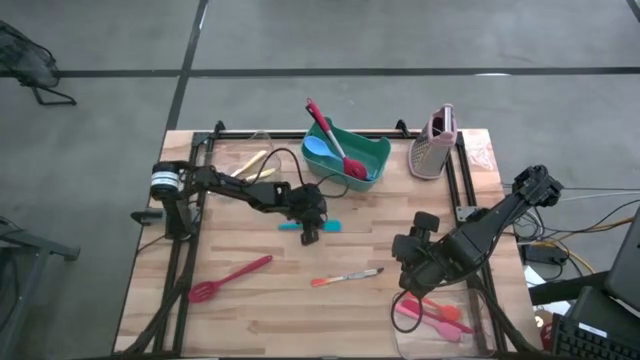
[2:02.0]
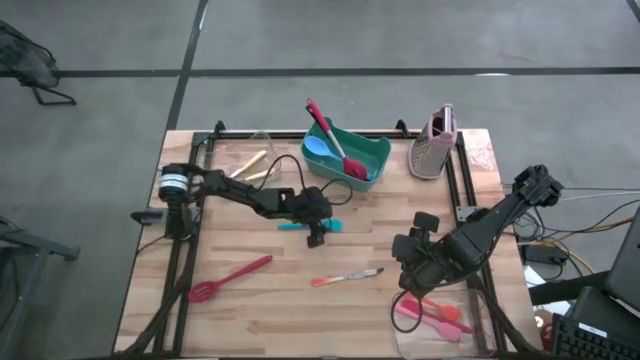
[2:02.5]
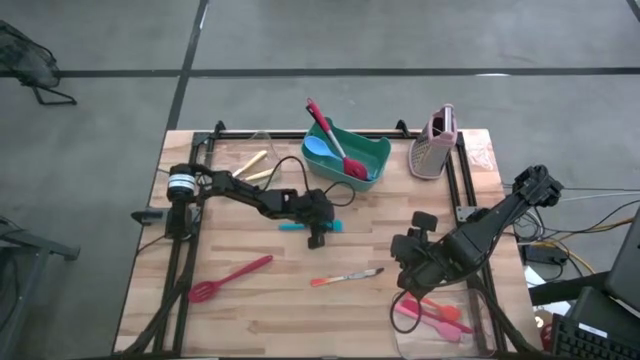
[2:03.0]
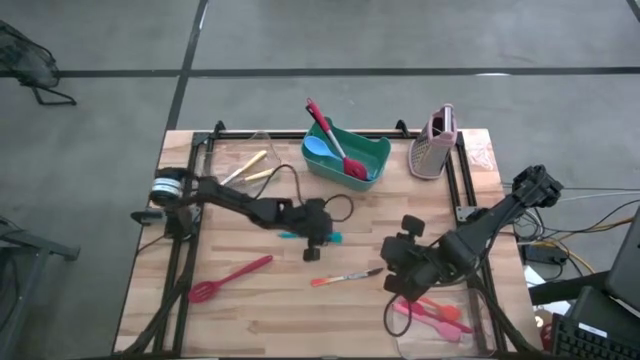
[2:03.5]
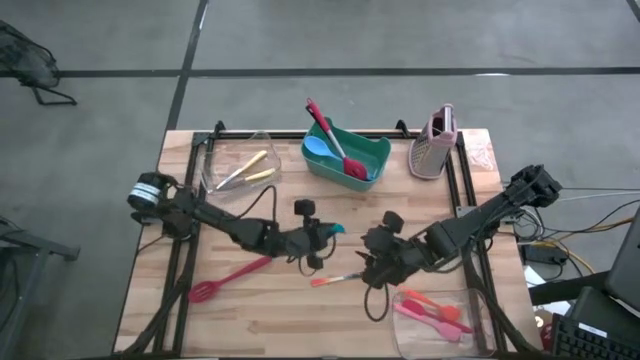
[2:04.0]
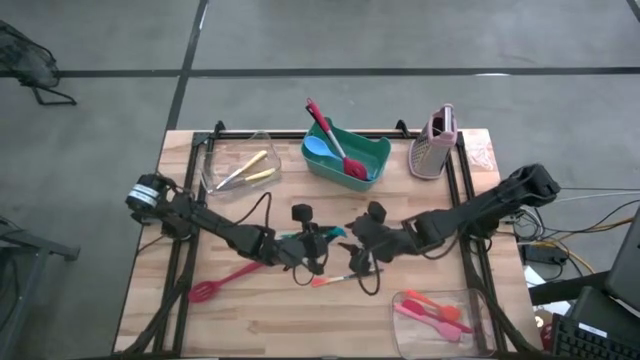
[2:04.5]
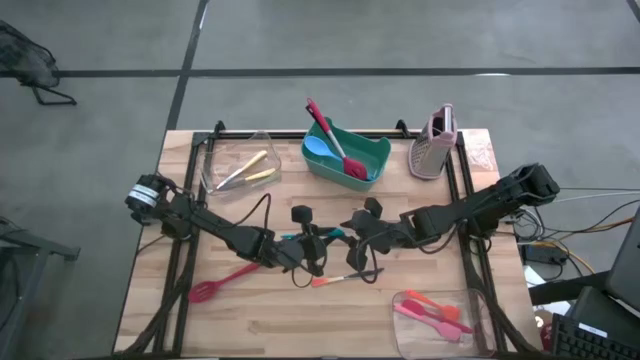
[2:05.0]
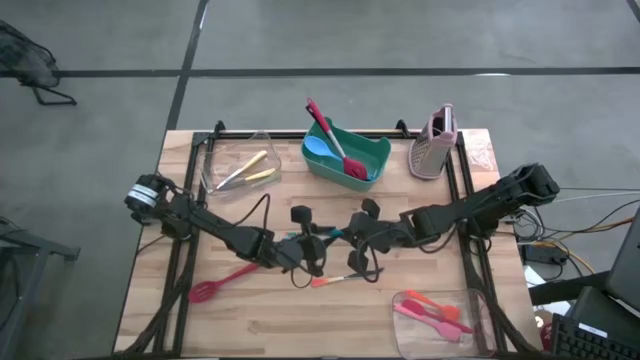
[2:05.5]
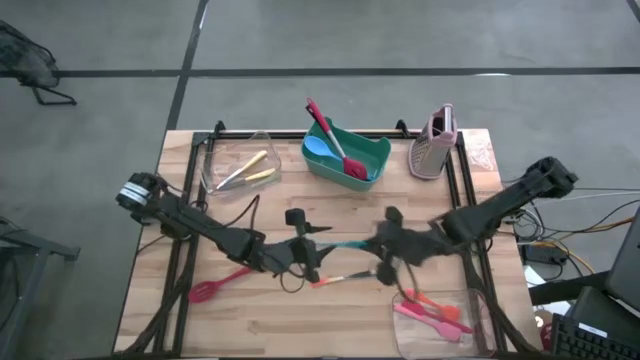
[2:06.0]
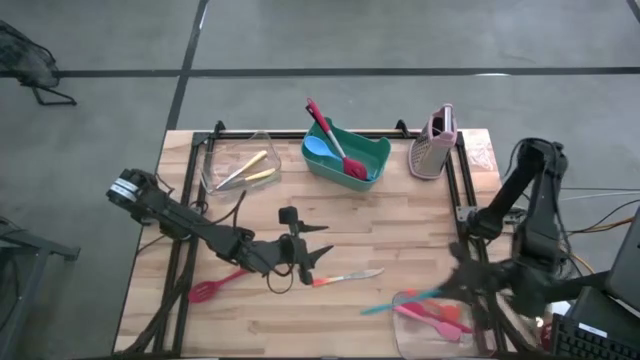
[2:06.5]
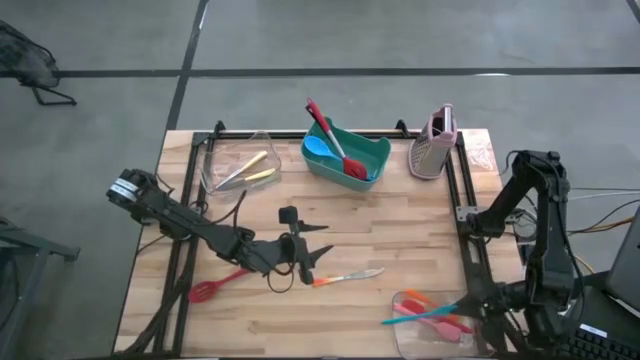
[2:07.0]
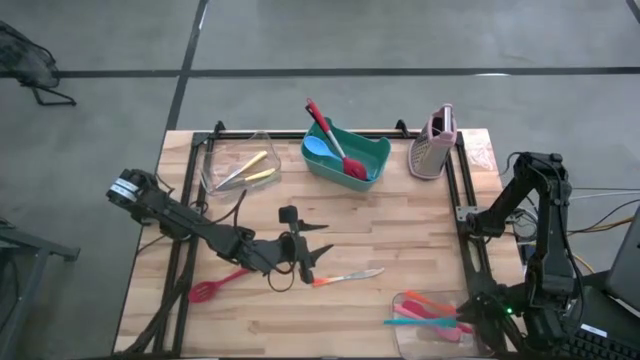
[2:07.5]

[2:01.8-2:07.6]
Task: Pick & Place Kitchen Items
Put the blue spatula into the bottom transparent bin

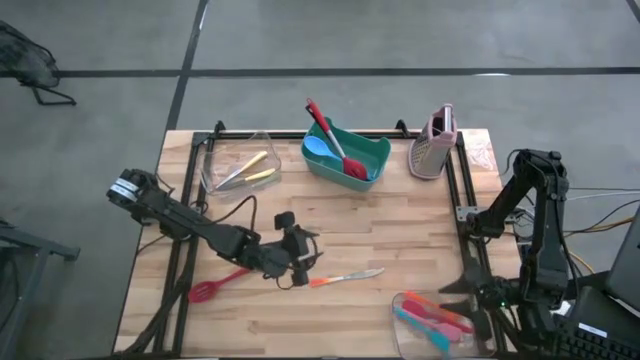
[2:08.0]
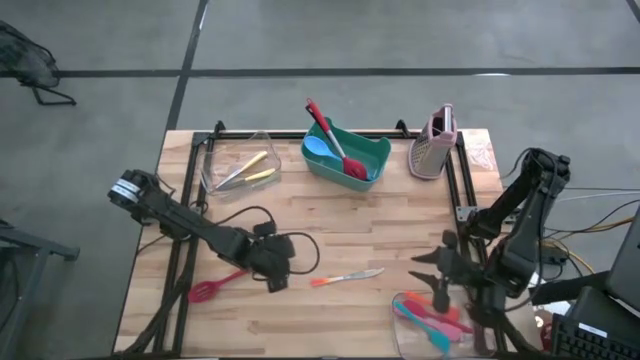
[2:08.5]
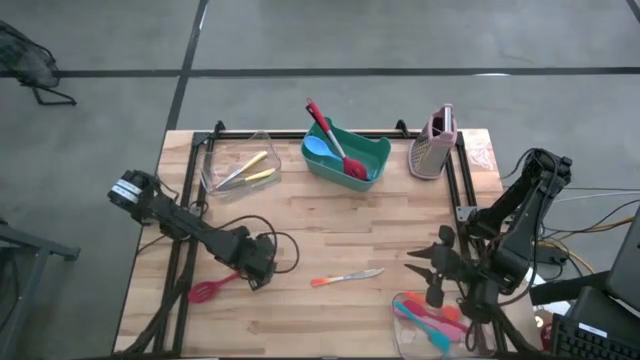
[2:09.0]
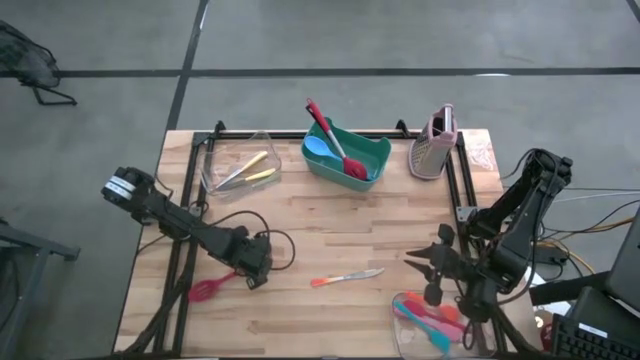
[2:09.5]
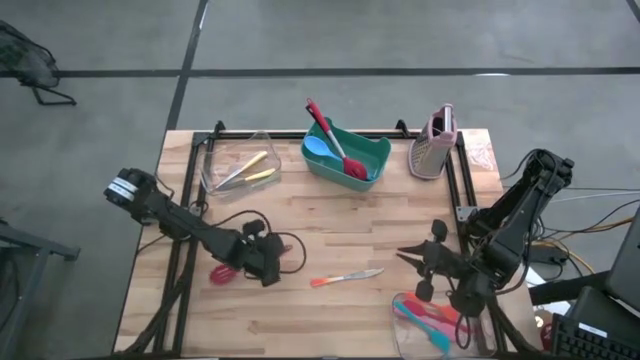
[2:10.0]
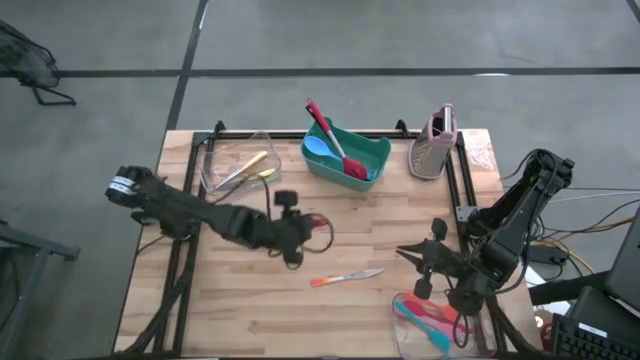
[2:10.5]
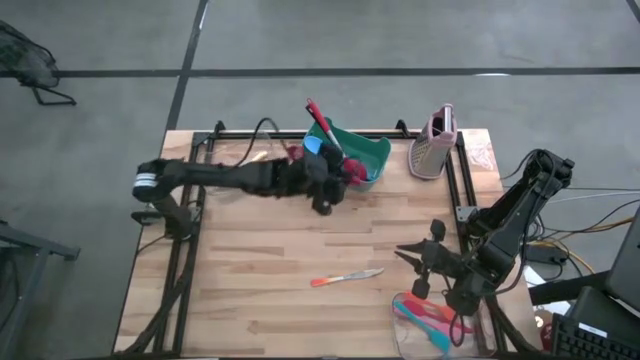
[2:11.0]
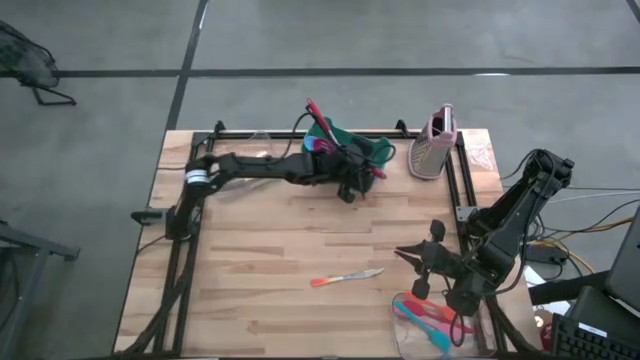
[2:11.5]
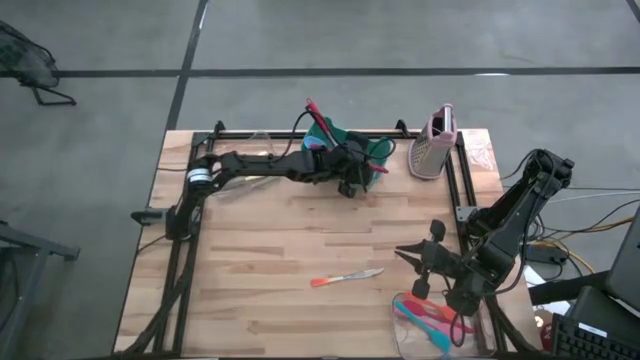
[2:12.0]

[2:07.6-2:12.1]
Put the red serving spoon into the green bin

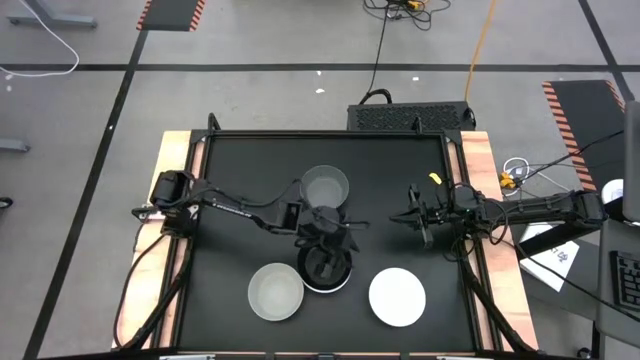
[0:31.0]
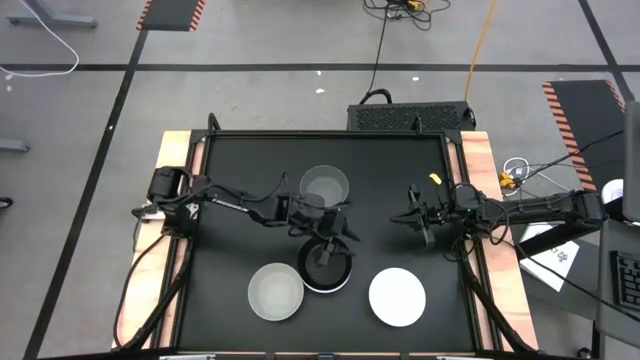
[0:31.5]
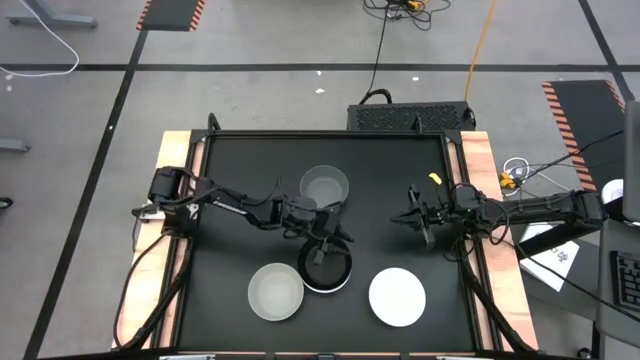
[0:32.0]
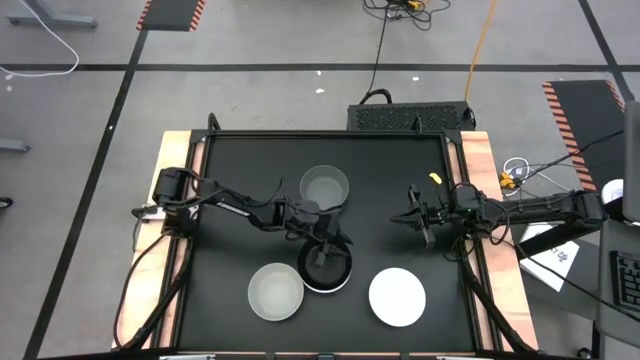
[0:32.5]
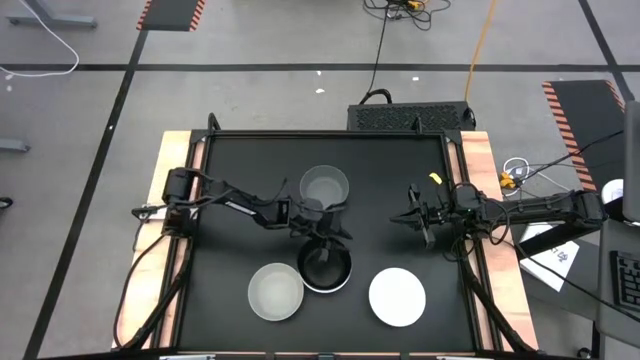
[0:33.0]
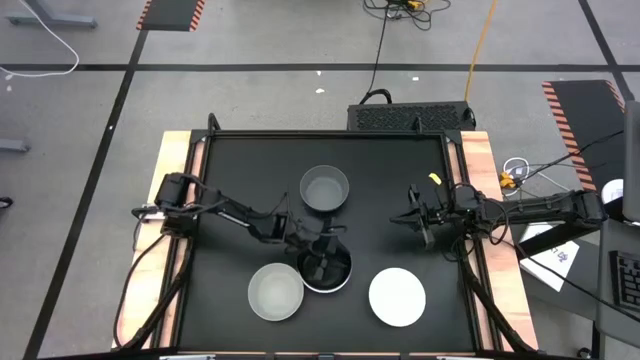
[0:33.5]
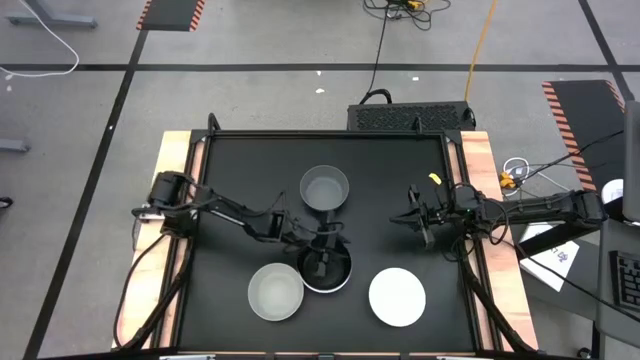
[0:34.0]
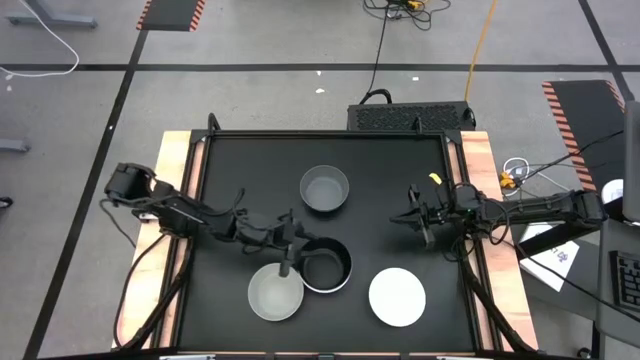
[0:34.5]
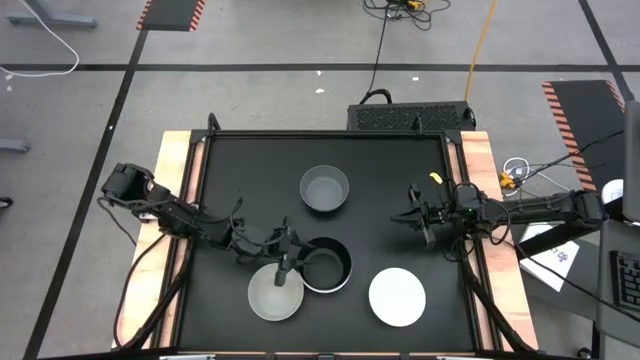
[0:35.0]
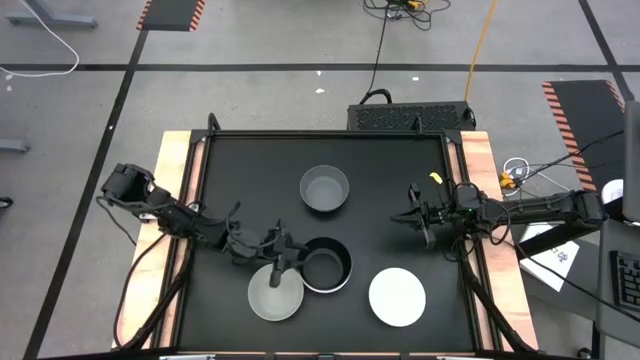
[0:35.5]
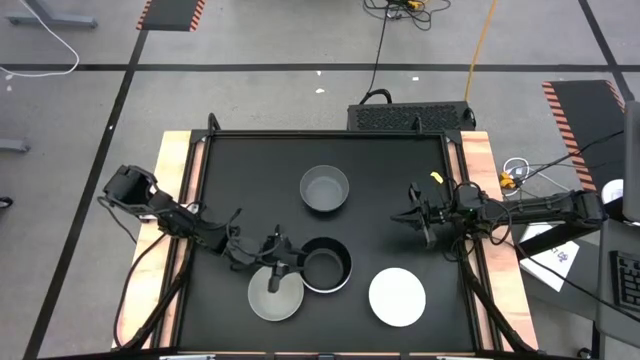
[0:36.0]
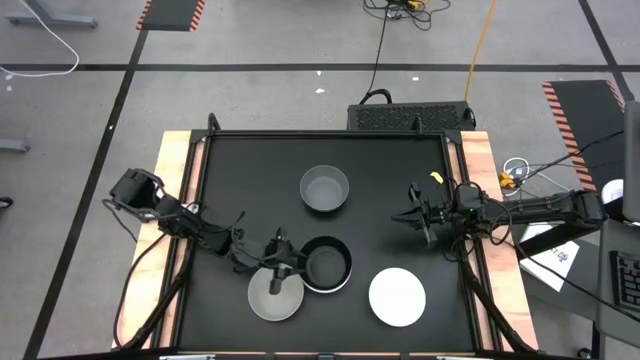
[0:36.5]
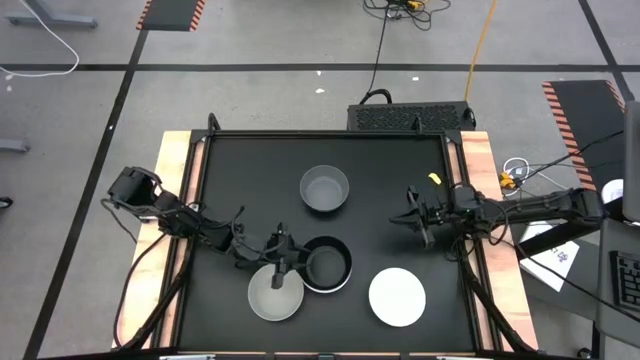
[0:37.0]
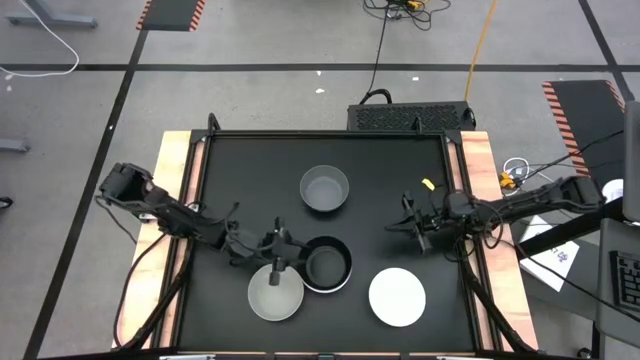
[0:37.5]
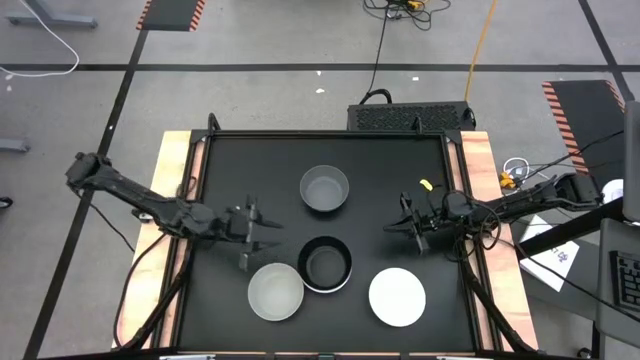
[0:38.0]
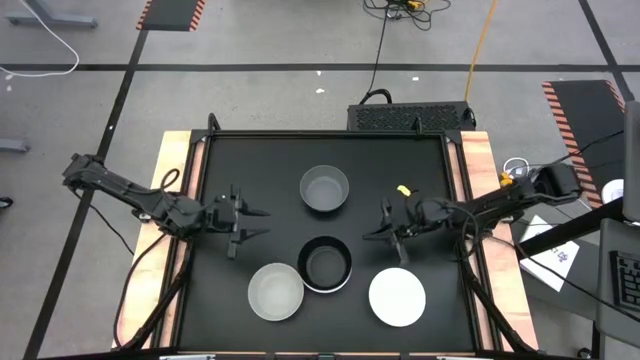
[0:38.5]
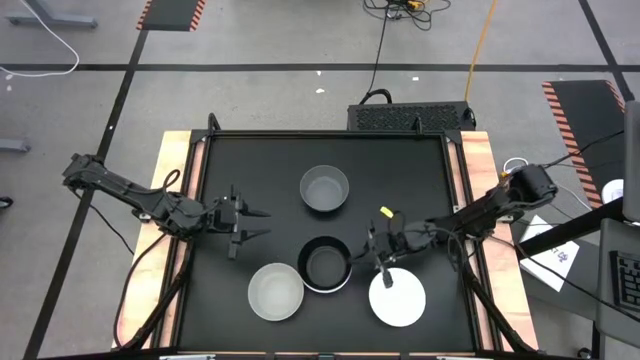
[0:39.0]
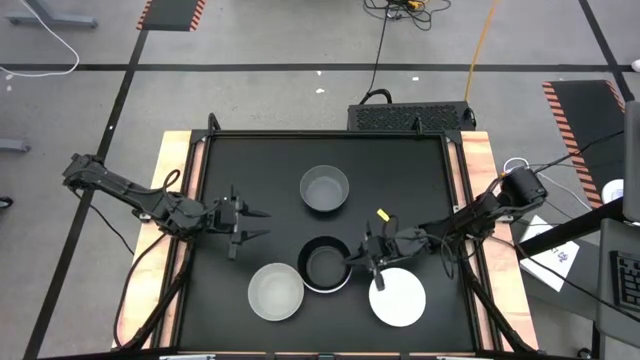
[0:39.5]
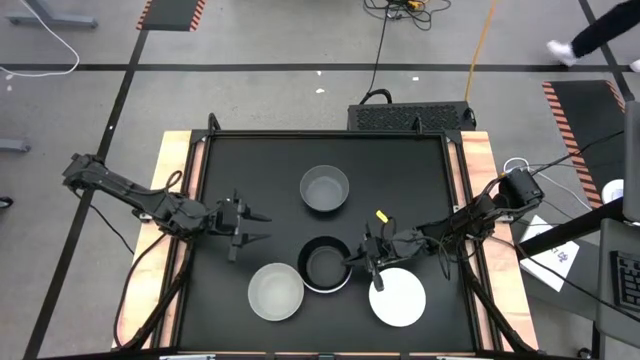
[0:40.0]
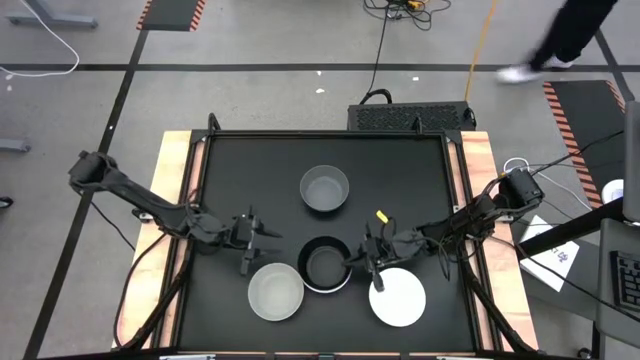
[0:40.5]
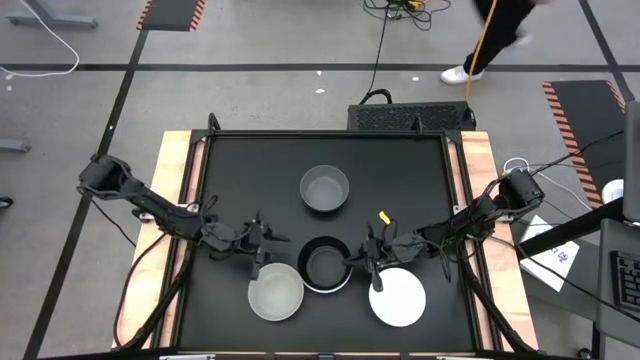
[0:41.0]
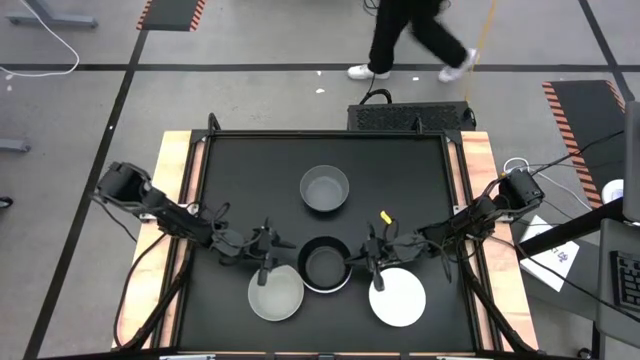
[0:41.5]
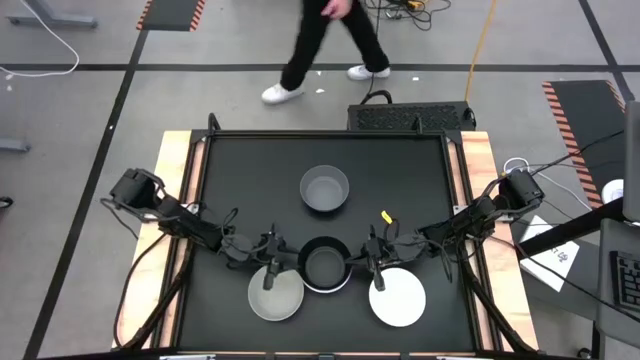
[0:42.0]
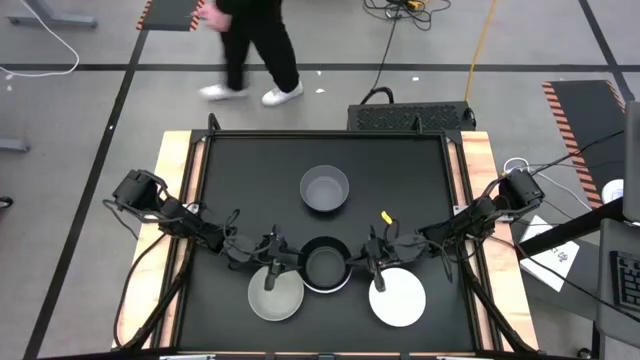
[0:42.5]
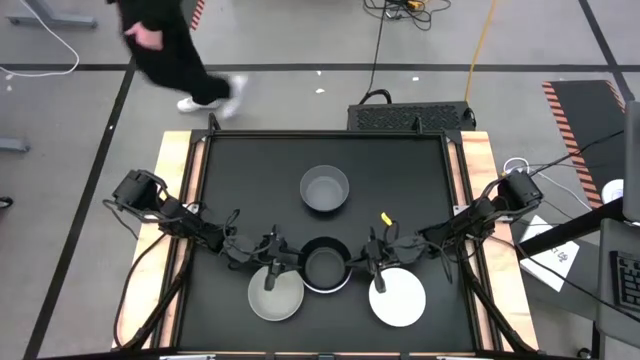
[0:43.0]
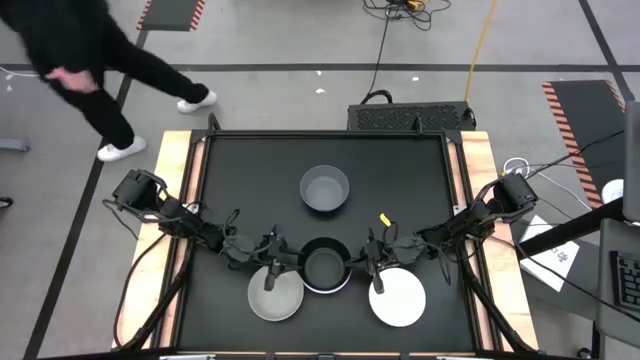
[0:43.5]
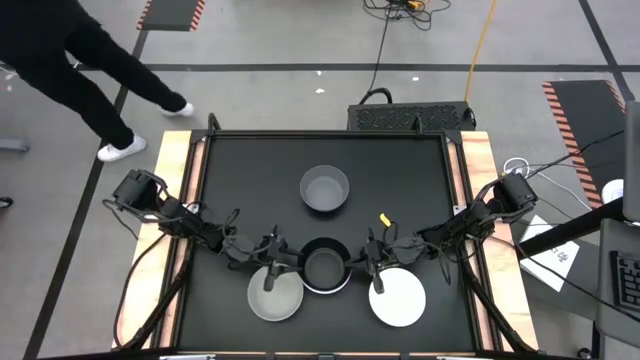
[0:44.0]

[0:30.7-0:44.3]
Task: Nest bowls inside each other
Stack the black bowl on the left white bowl
